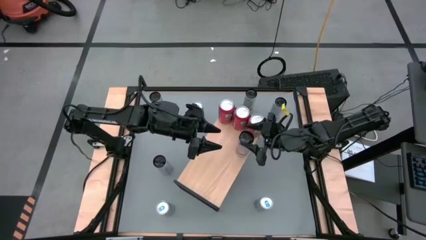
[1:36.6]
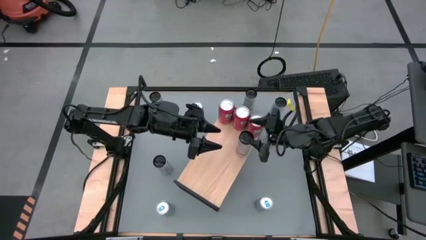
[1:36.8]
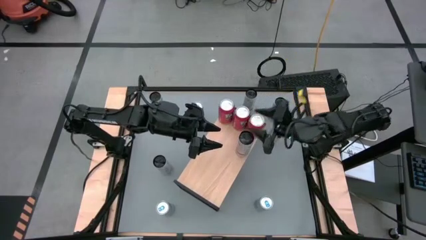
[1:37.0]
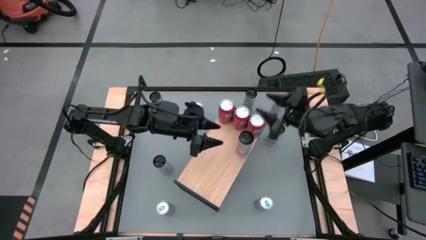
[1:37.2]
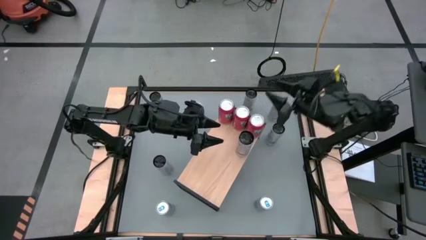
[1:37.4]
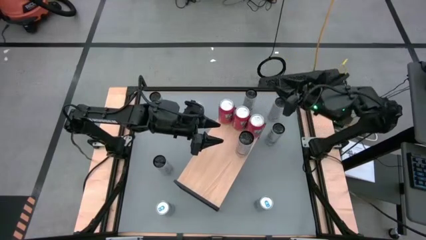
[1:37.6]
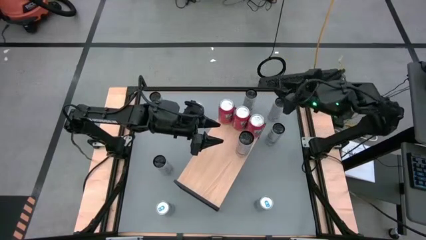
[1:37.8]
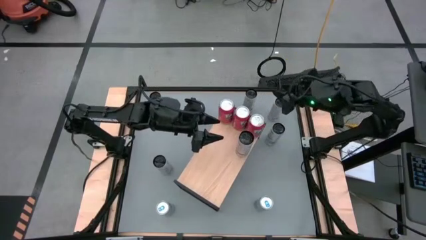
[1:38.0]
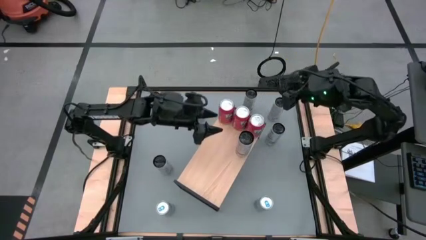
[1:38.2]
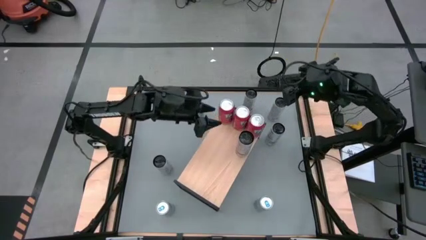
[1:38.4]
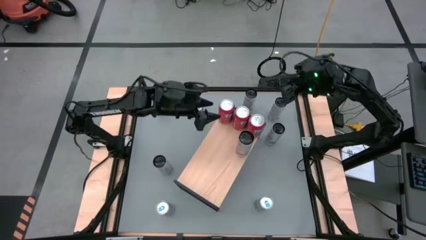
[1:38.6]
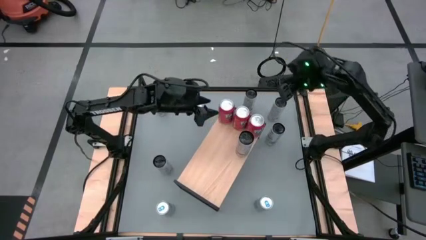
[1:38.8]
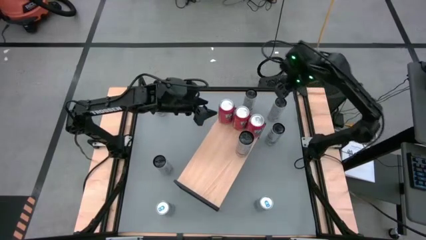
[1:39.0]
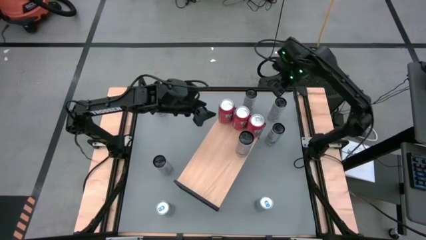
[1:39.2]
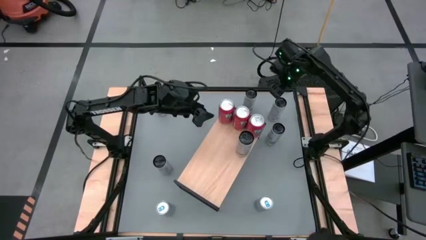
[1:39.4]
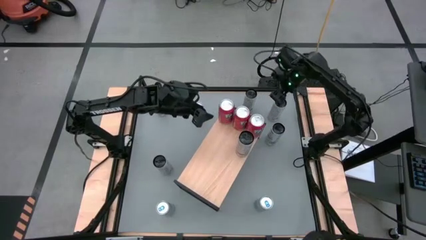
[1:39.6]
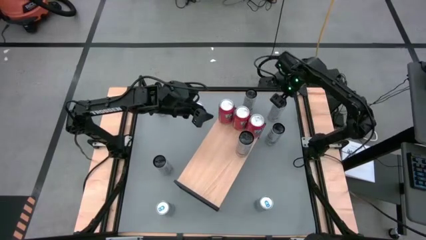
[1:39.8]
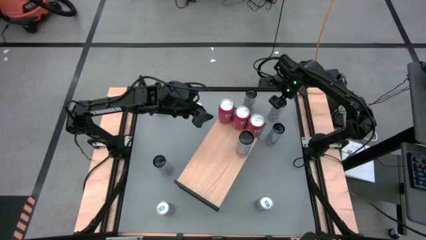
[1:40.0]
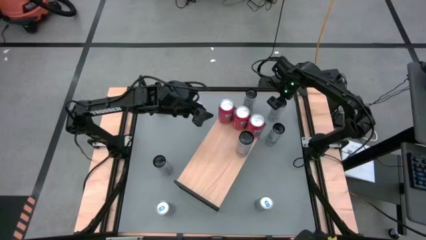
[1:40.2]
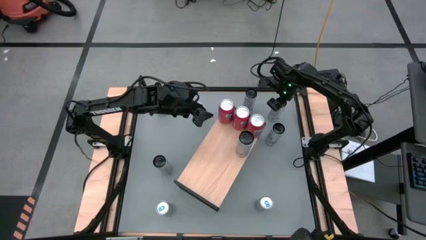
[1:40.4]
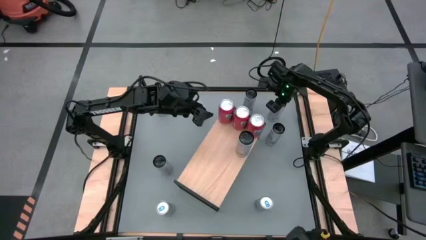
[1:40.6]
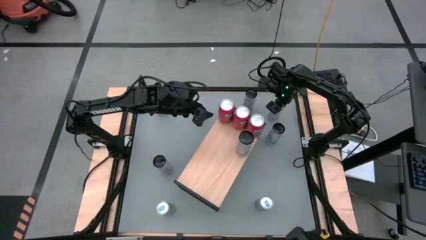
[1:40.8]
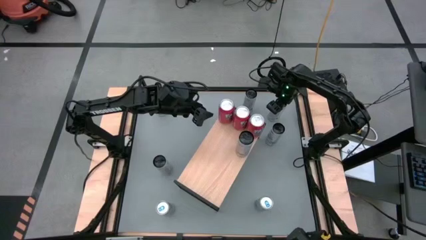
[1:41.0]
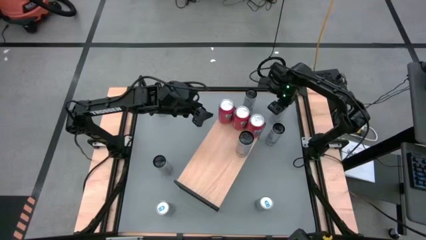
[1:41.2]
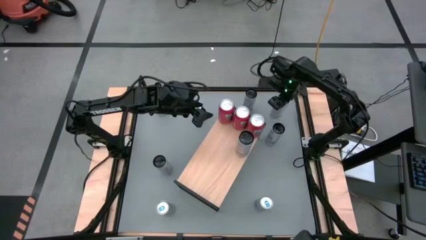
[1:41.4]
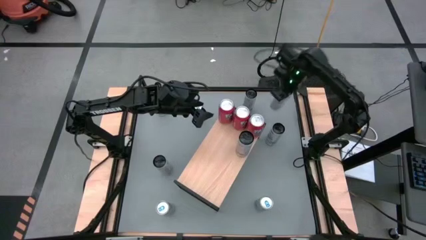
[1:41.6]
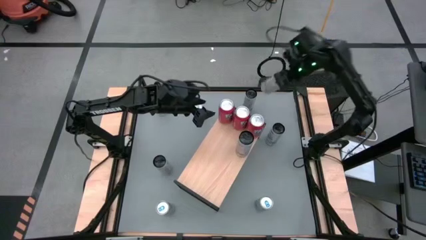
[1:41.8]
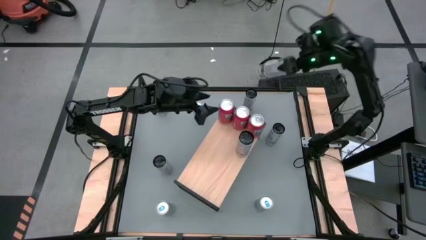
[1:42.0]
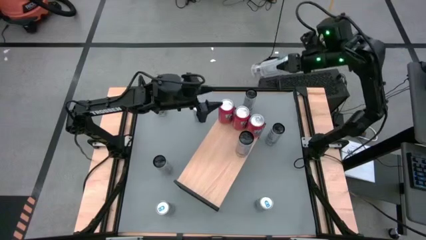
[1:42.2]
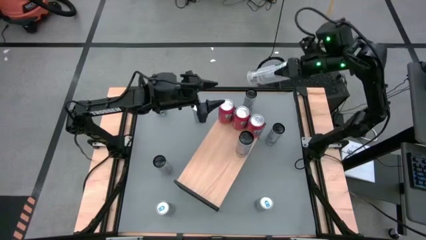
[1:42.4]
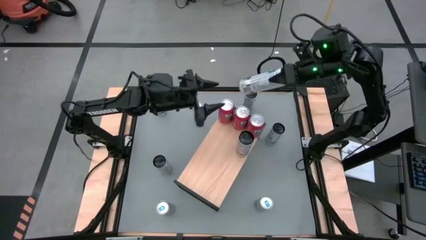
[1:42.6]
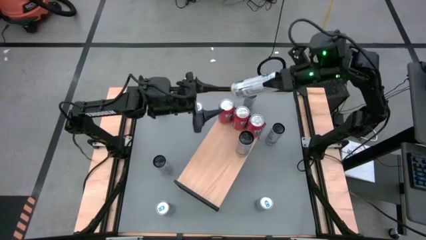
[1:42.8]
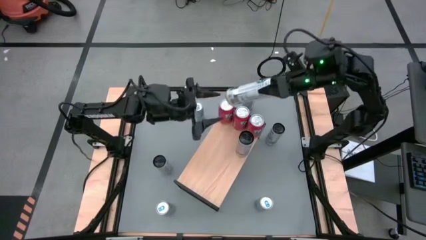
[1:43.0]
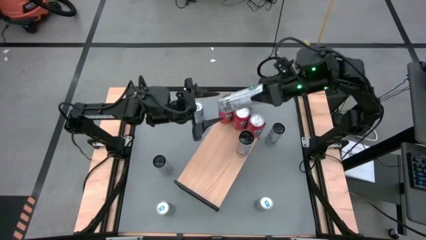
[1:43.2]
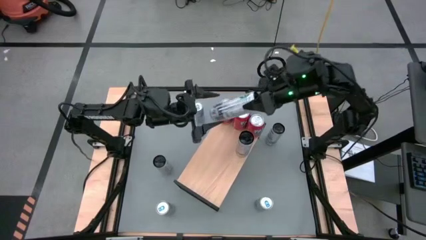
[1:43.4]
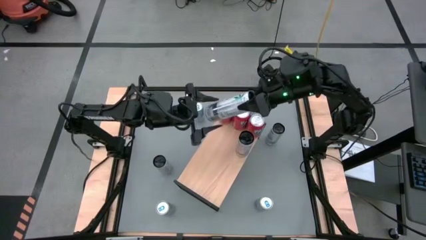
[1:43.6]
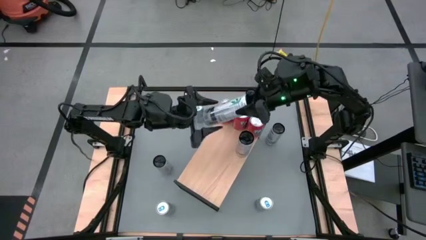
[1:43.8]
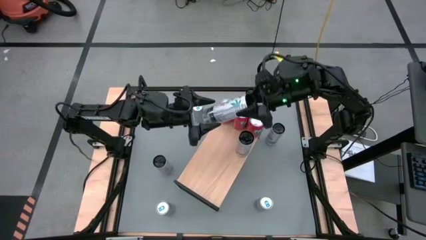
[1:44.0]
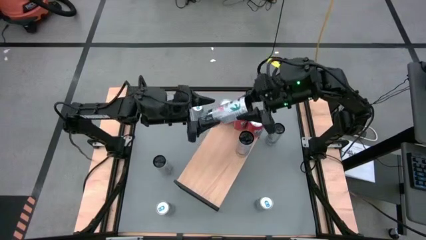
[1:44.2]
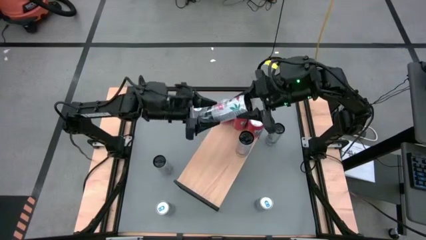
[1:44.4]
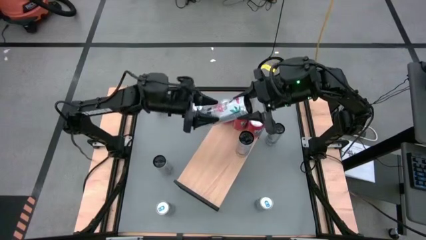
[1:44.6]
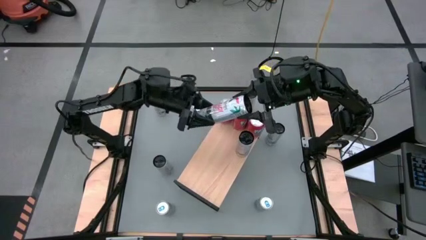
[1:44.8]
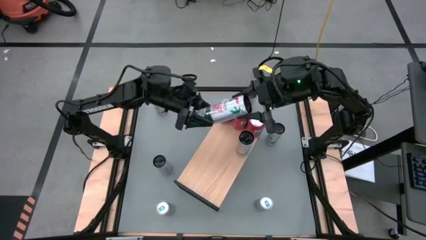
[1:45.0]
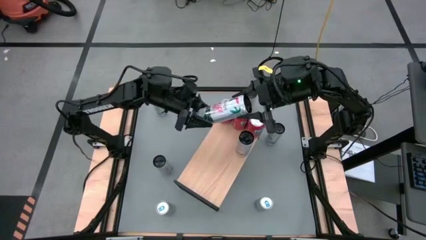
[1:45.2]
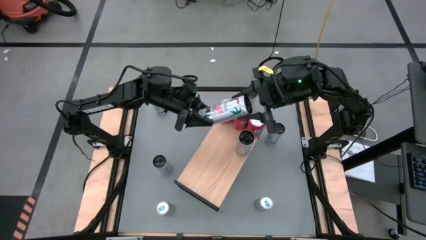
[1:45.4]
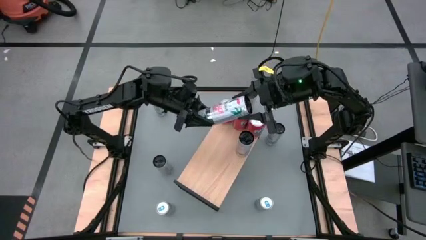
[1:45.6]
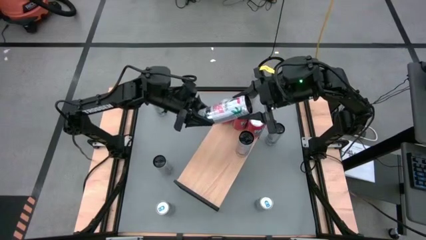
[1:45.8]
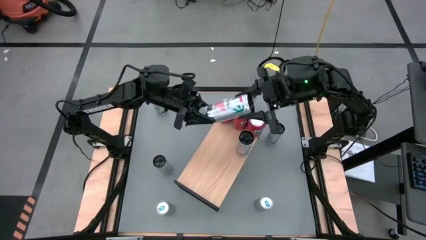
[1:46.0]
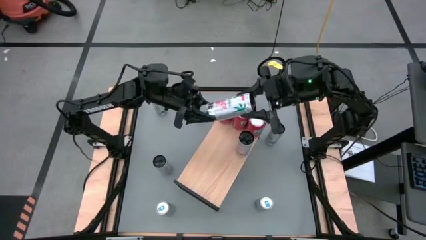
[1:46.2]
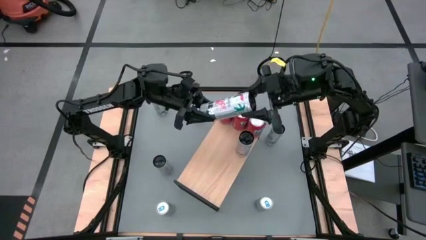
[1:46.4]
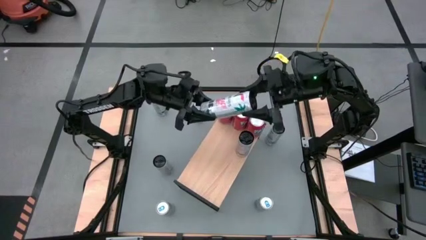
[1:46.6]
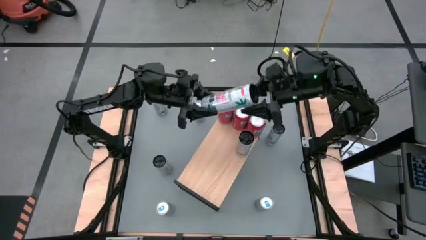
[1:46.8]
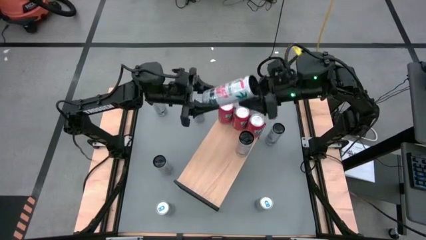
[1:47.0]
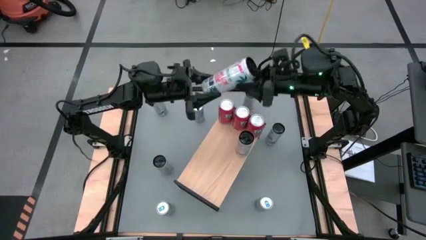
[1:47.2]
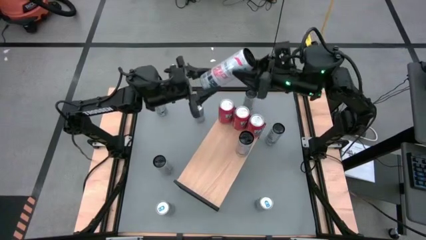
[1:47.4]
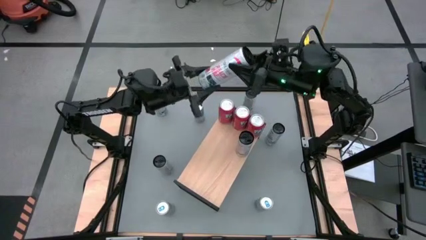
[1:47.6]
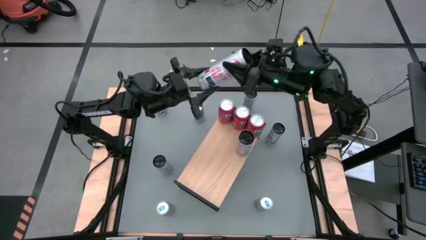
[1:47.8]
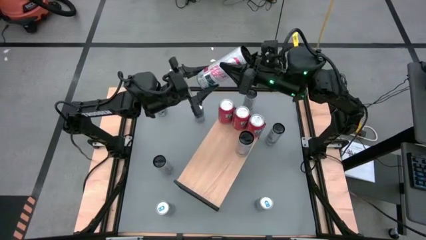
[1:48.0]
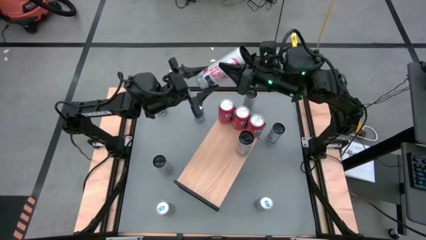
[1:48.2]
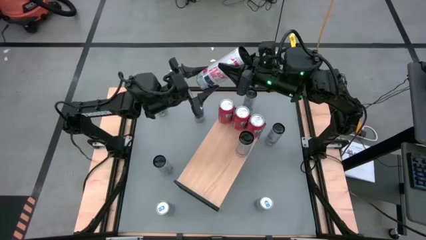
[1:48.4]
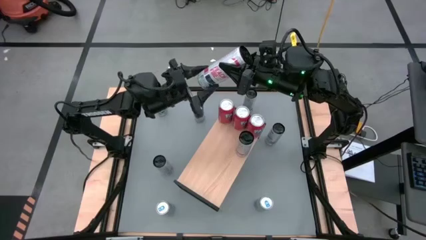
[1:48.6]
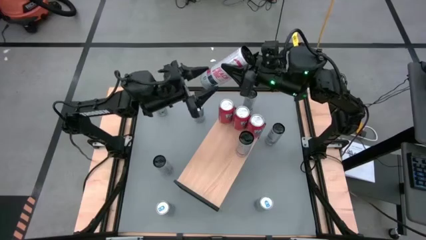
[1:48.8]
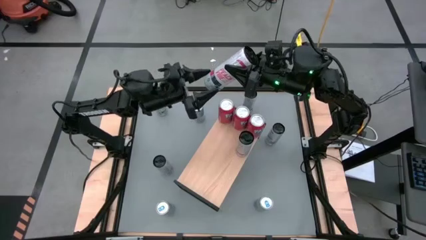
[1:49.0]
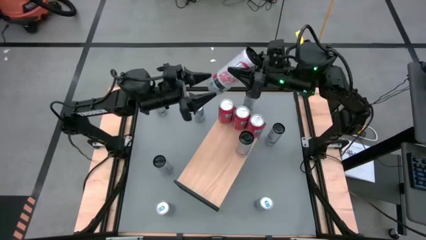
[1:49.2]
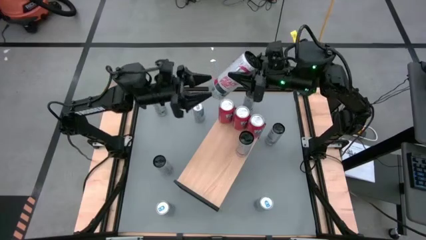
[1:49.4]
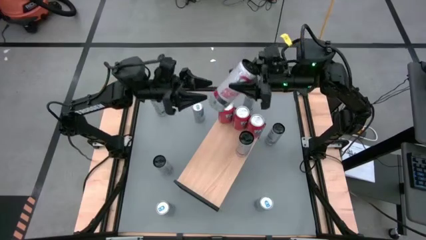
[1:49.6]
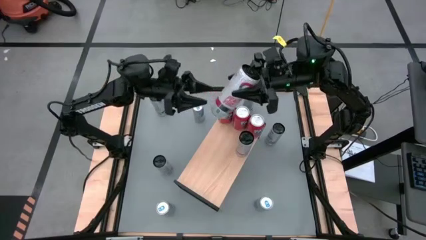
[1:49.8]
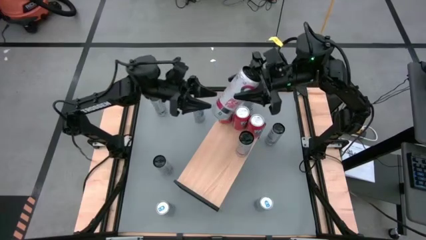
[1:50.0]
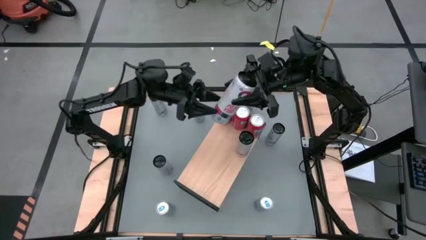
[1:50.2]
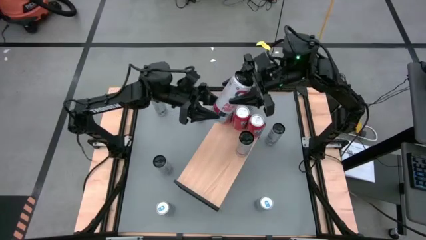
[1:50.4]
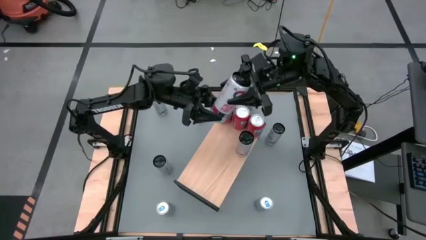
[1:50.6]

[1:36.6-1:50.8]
Task: Place canned beverage on shelf
Put the white pink soda can on the shelf aligned with the other white pink soda can

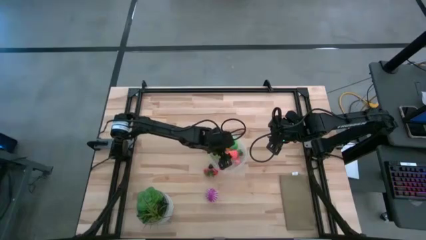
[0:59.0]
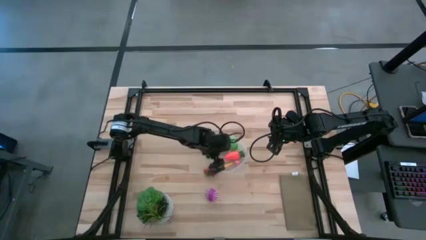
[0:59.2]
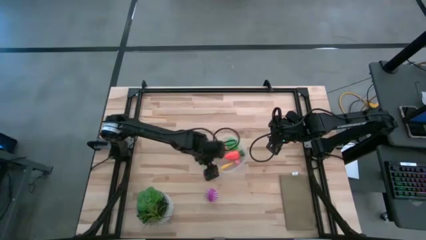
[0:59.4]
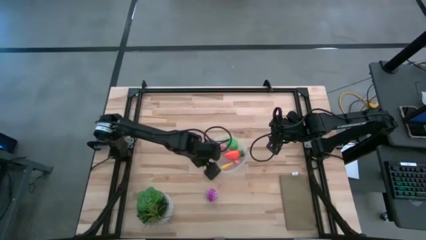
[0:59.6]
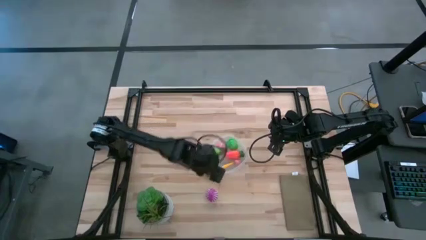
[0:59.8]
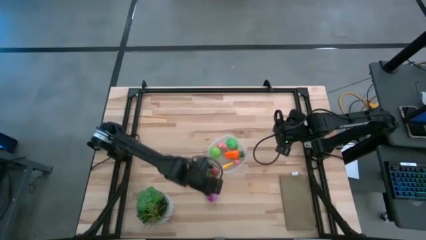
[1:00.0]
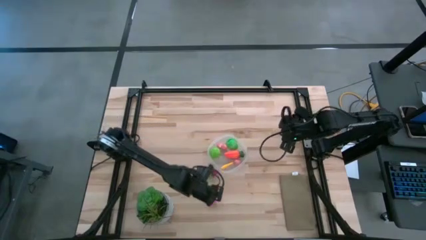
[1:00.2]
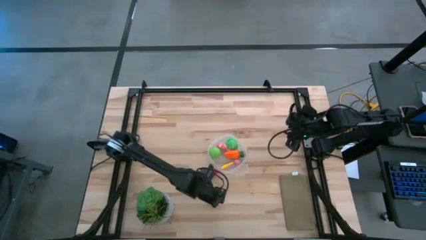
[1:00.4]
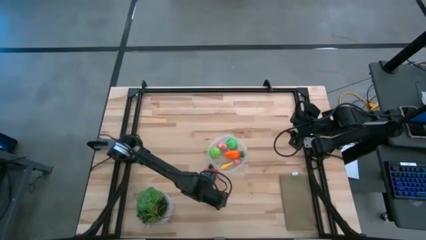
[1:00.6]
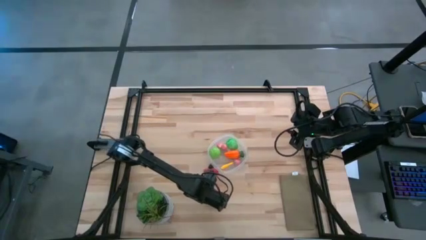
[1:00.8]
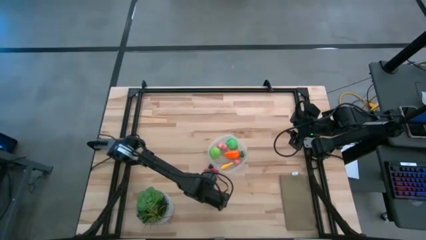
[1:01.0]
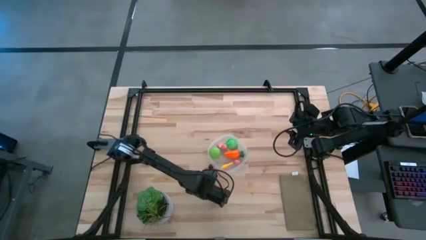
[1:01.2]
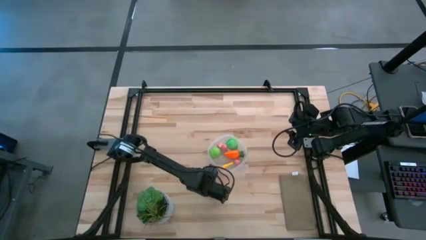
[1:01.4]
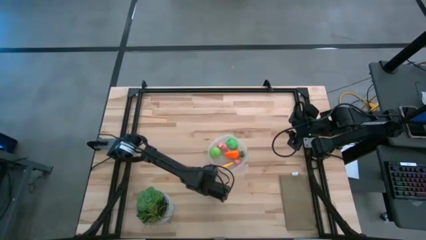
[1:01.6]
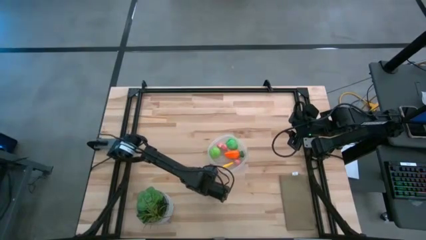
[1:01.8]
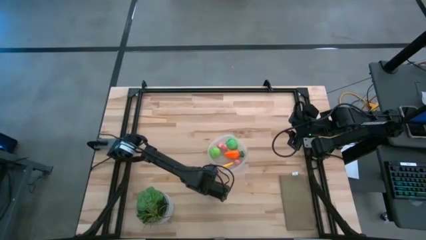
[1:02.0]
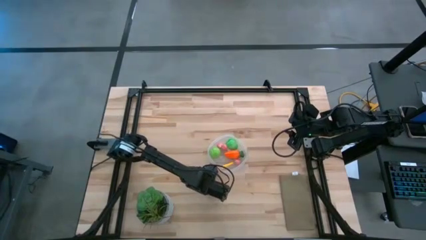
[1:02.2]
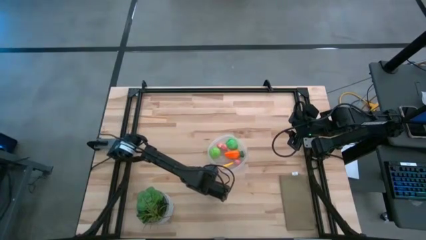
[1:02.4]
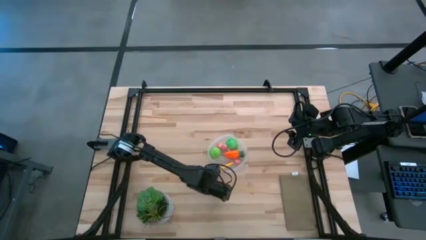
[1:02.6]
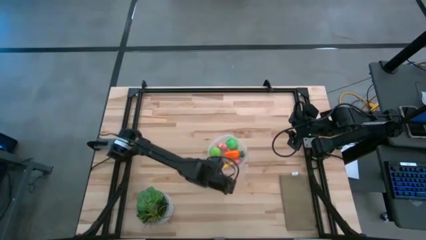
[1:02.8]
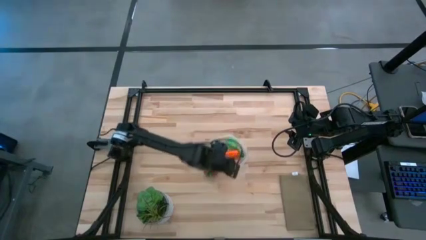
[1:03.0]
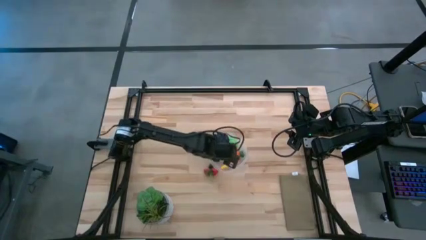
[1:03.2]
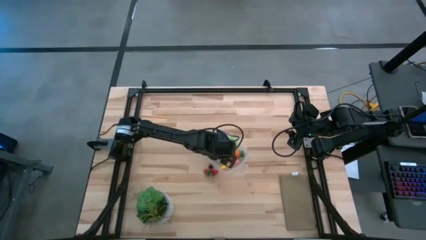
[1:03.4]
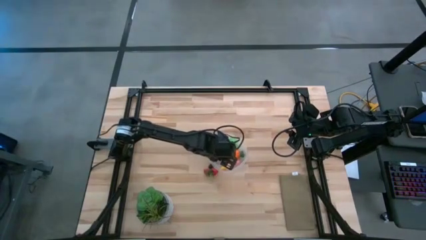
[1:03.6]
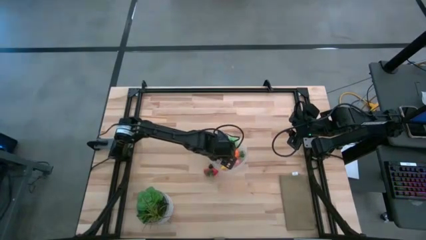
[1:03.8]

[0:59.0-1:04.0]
Task: Pick and placing Produce into tupperware
Put the purple onion into the transparent bin
